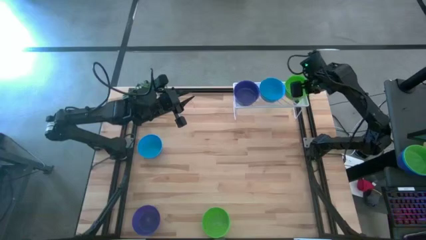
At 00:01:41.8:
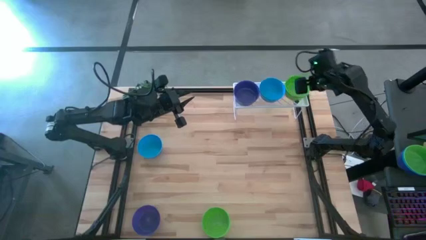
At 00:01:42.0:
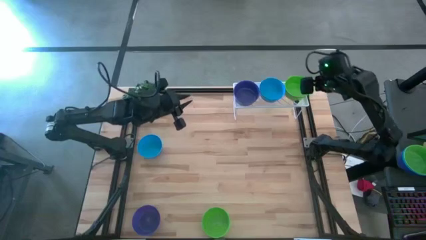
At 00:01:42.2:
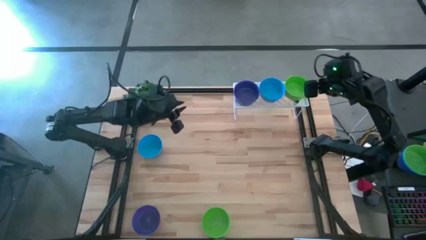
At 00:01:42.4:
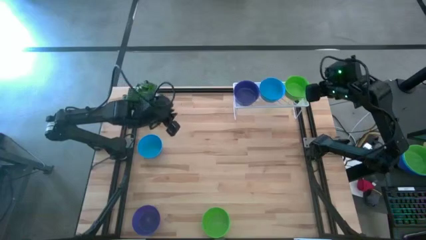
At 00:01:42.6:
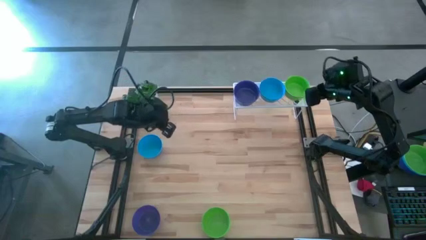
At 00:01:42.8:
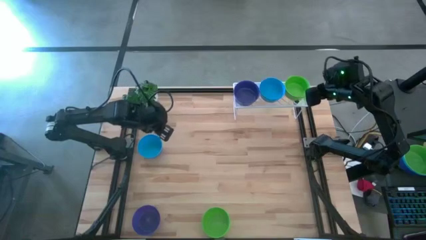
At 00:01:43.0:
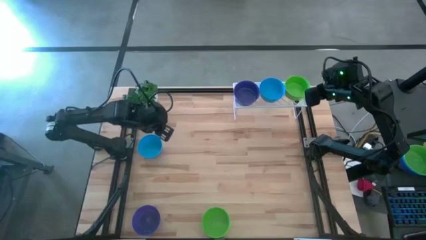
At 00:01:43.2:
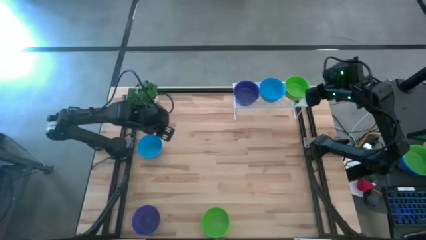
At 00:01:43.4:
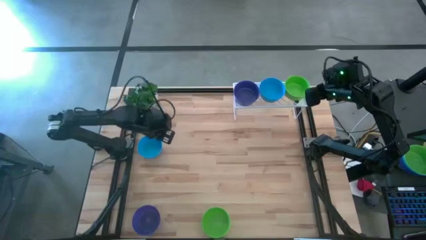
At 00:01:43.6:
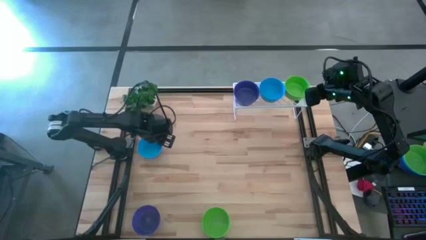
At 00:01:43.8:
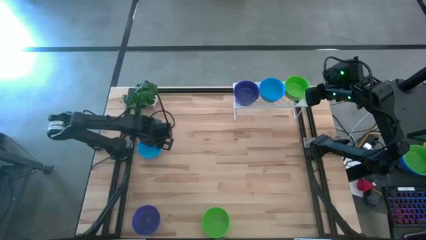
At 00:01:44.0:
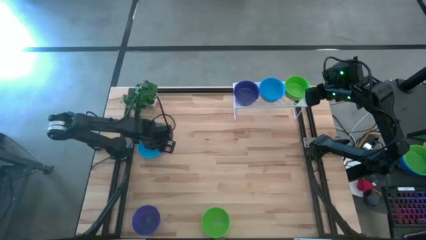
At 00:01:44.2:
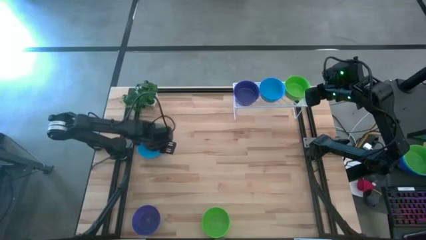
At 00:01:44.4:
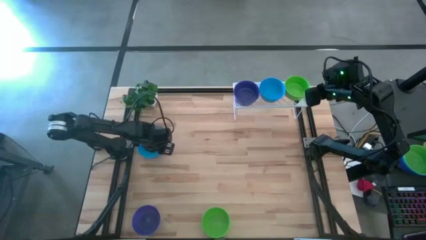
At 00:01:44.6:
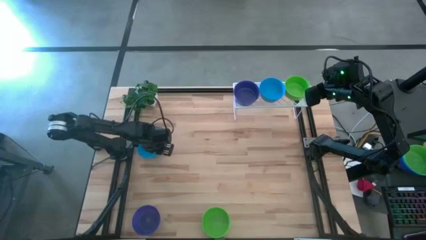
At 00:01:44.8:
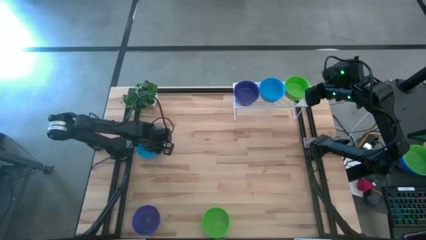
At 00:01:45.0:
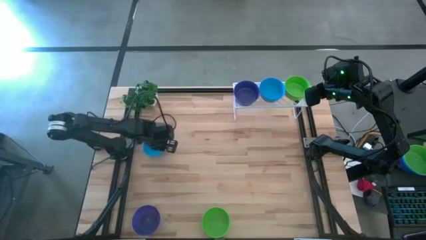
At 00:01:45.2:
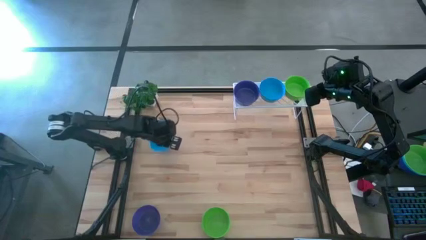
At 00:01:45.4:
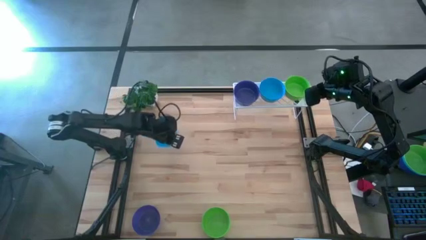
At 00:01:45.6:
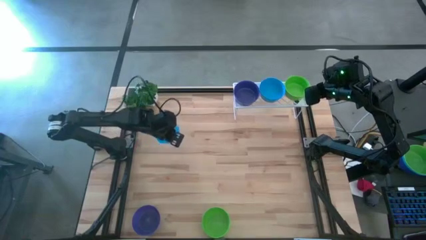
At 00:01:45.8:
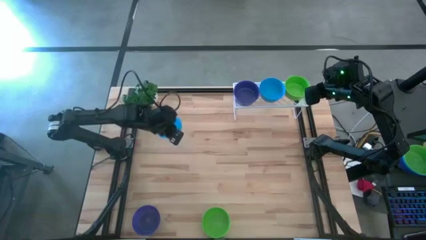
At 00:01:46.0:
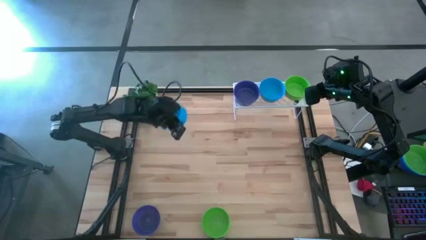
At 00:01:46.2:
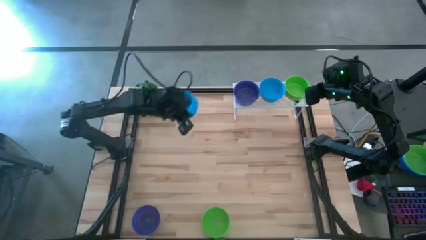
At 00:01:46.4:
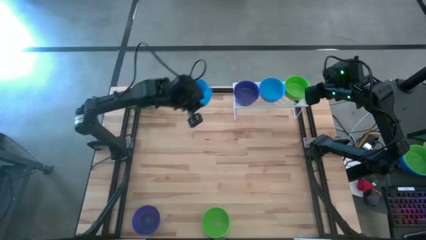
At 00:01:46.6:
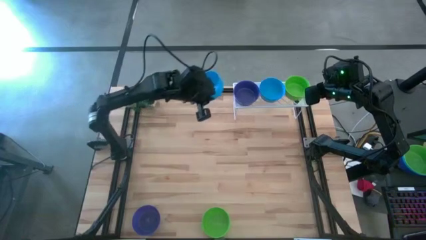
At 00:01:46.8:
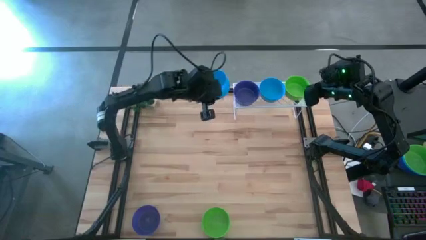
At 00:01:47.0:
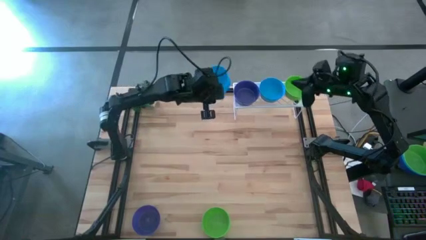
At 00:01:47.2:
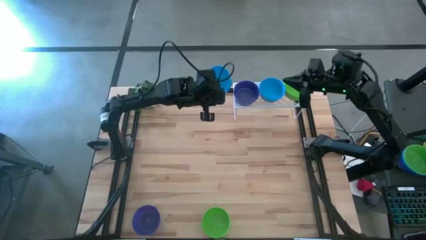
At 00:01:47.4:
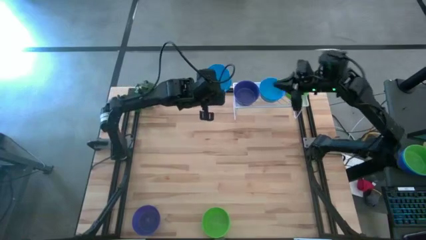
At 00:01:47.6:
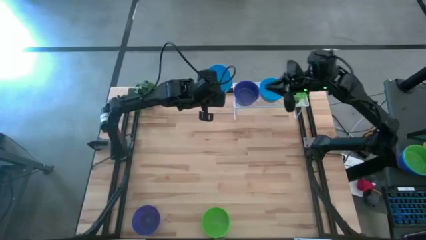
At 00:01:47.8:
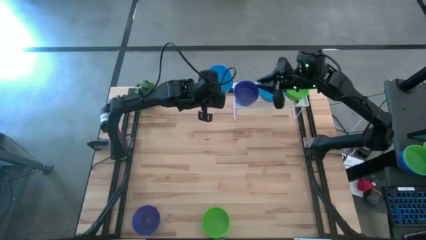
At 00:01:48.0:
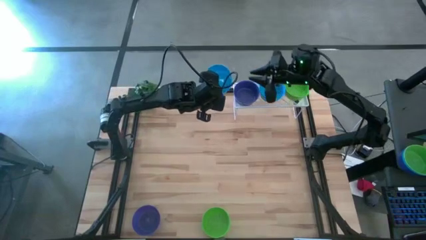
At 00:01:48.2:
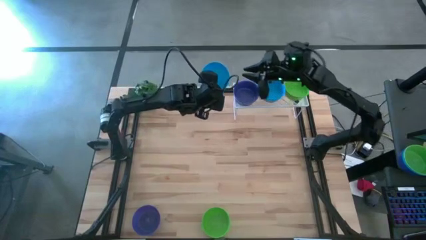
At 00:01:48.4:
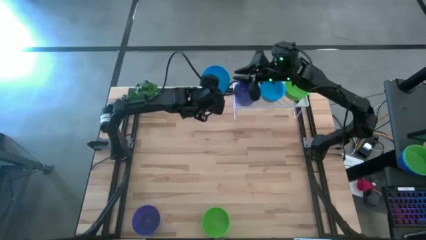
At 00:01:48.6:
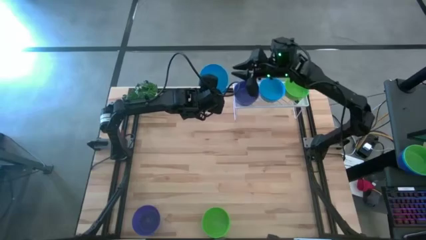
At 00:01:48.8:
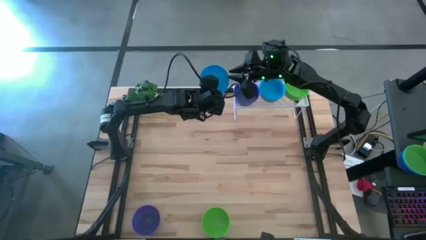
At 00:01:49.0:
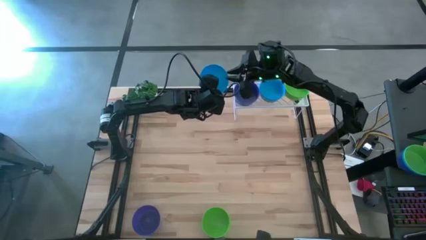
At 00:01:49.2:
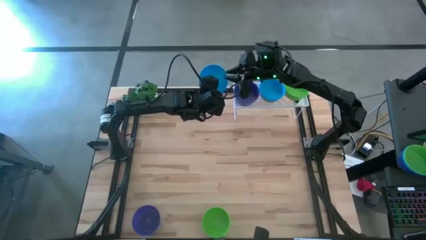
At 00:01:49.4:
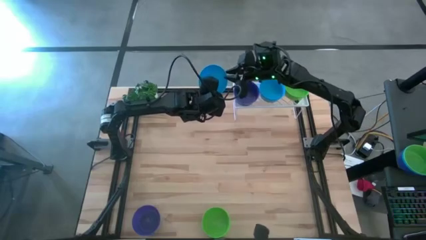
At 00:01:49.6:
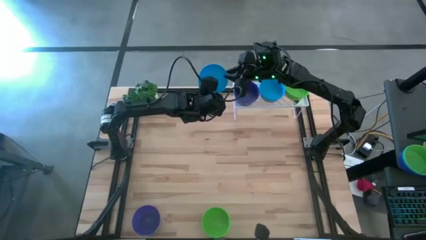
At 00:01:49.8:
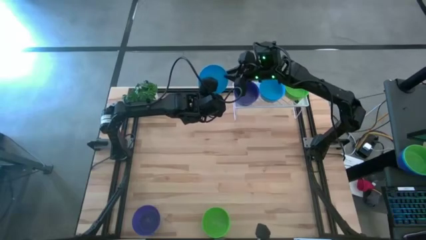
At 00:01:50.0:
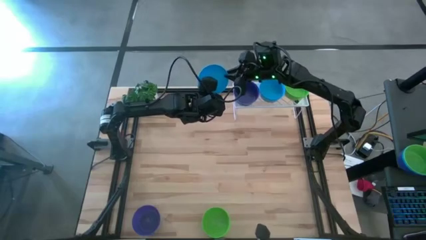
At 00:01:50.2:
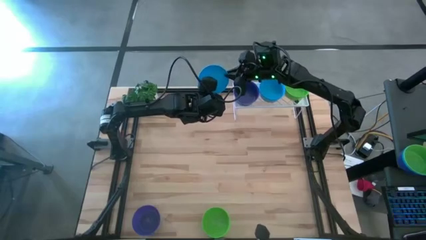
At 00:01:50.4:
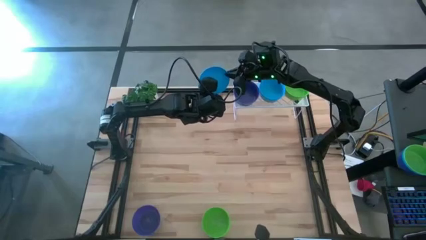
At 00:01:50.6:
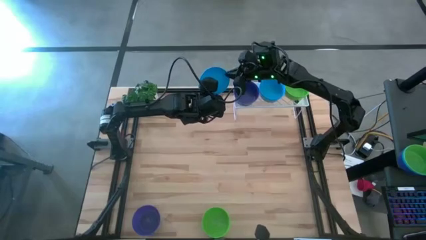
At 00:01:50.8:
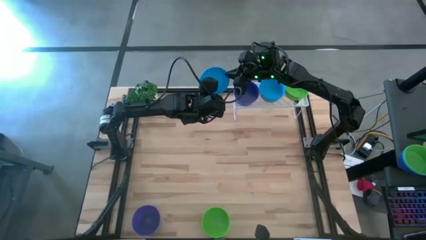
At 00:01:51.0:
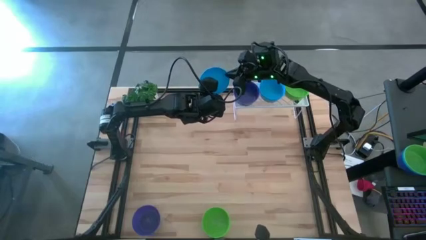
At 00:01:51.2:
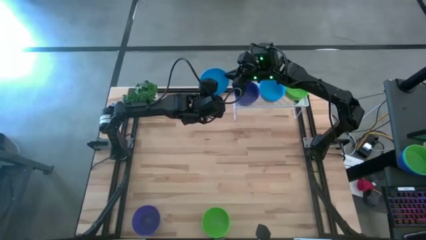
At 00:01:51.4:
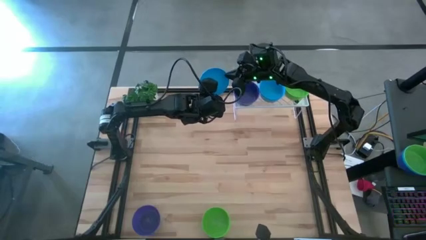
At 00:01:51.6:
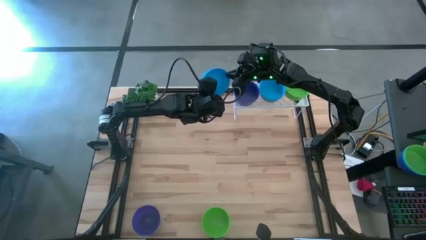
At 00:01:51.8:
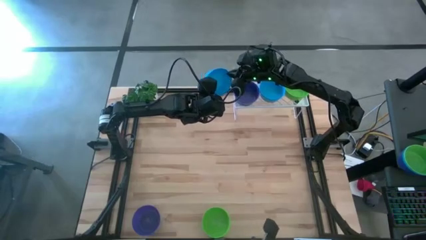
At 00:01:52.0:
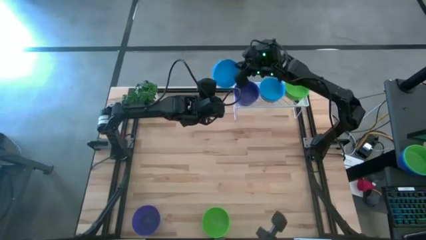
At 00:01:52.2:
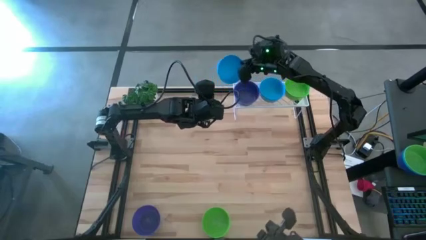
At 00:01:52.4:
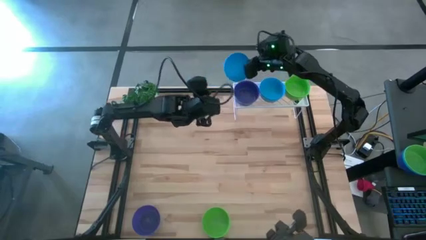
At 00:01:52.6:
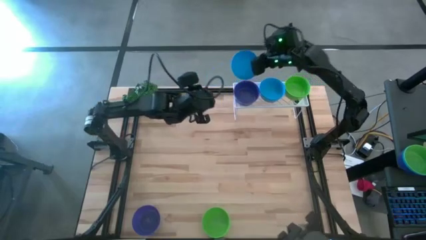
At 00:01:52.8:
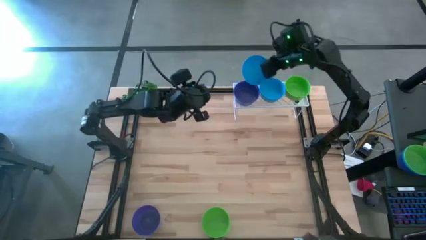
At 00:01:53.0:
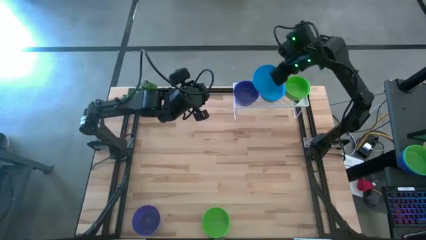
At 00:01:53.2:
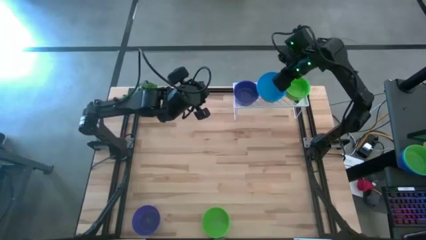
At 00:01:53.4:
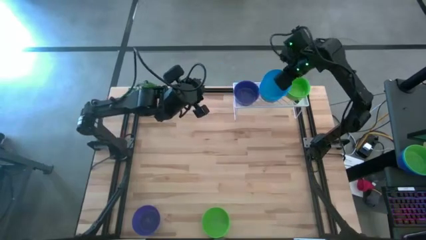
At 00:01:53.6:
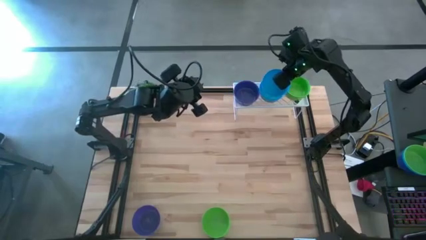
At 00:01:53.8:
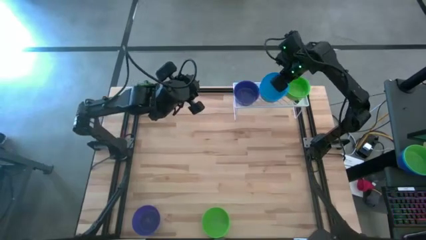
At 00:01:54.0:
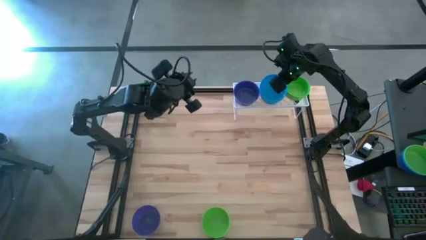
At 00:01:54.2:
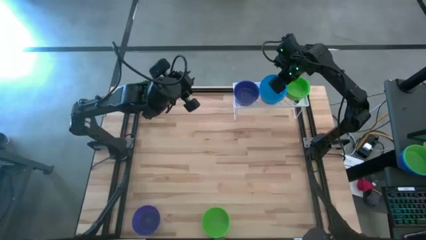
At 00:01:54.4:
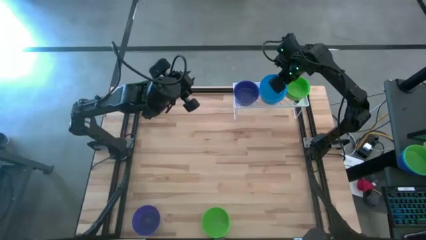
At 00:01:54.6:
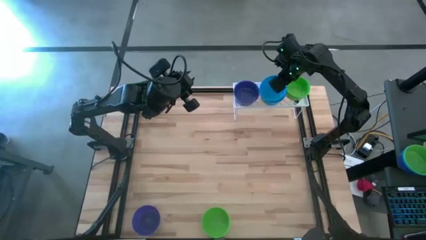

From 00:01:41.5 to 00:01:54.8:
Task: Pick & Place Mini bowls
Stack the blue bowl on top of the blue bowls on the shelf

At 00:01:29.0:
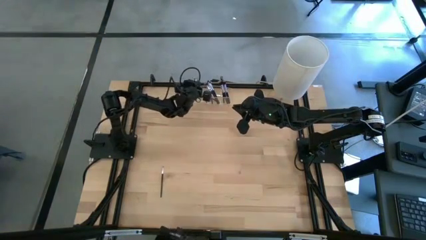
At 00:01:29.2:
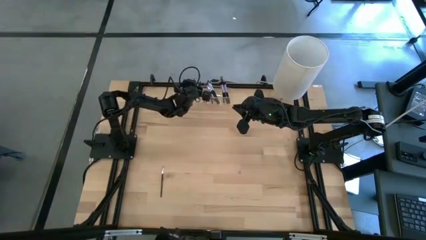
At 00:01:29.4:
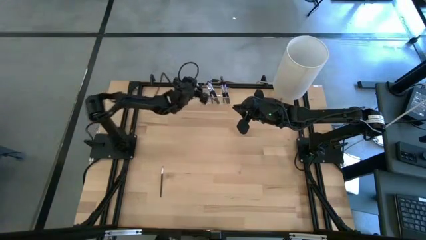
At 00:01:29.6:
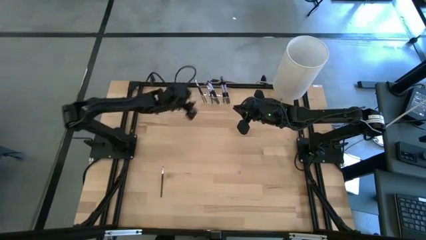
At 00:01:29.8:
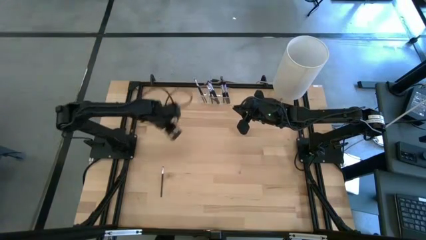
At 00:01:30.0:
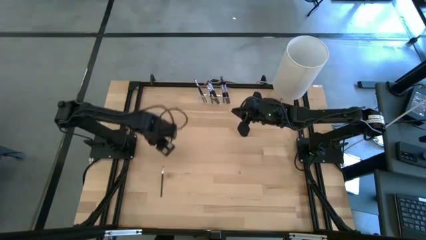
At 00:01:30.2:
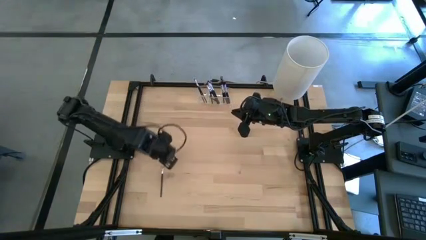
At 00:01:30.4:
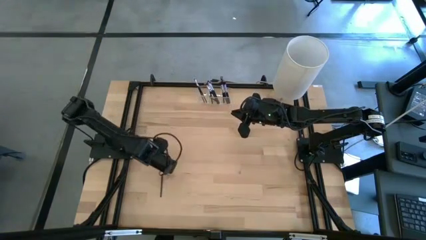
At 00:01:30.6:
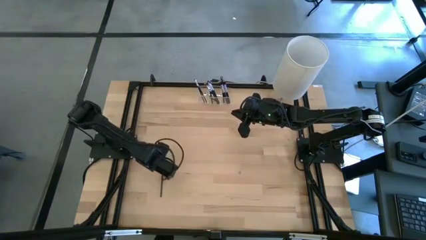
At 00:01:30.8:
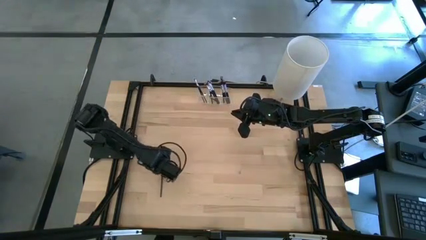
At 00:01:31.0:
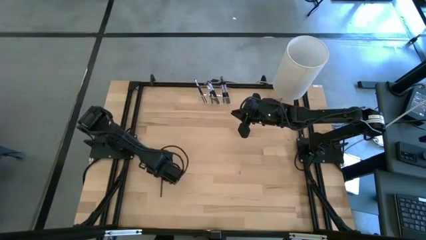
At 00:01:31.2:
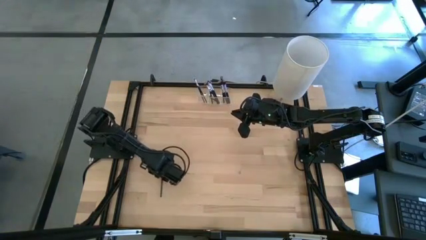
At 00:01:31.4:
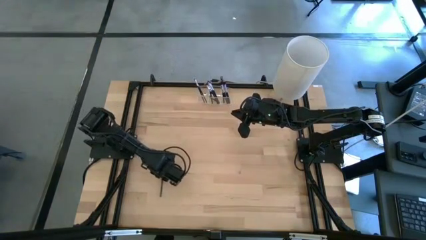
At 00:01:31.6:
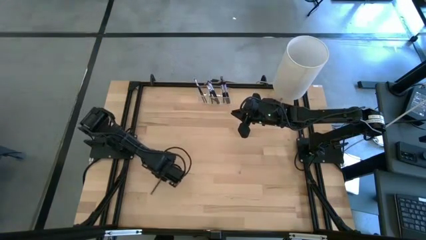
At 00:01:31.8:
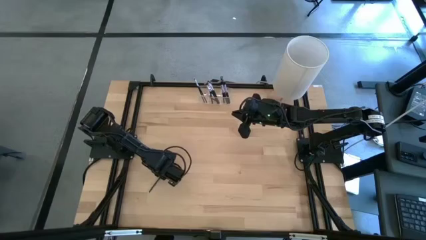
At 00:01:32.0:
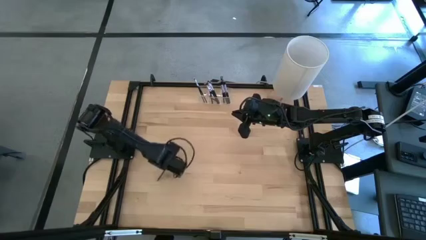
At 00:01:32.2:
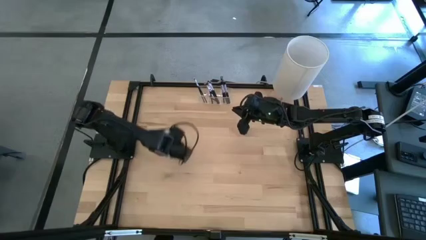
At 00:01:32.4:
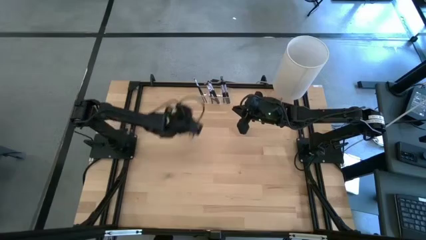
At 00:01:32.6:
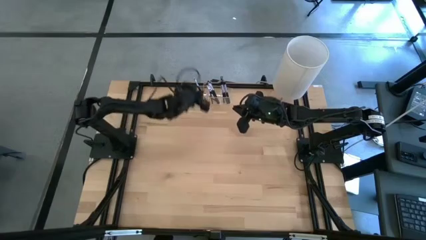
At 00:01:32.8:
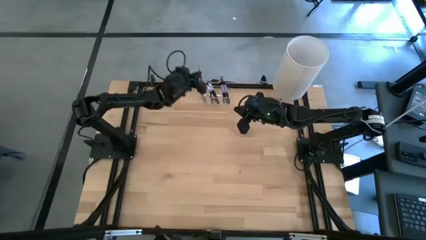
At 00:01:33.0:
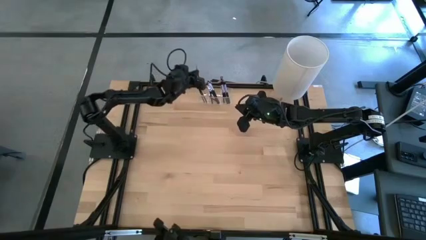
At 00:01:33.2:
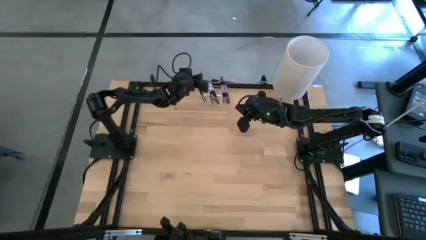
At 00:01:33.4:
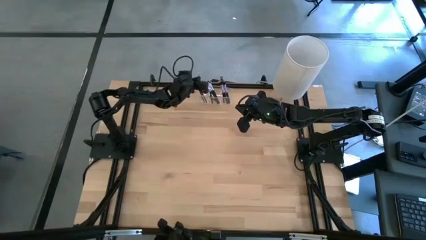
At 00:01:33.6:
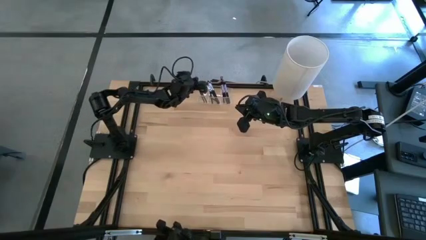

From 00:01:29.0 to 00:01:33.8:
Task: Put items in baskets/containers
Put the black eyeshadow brush into the transparent organizer
